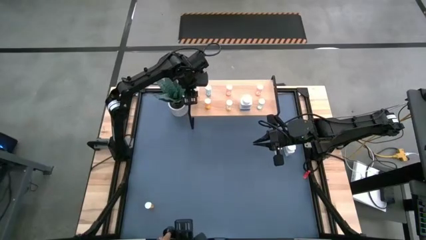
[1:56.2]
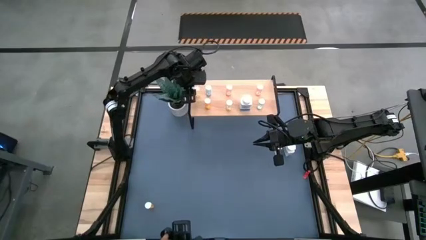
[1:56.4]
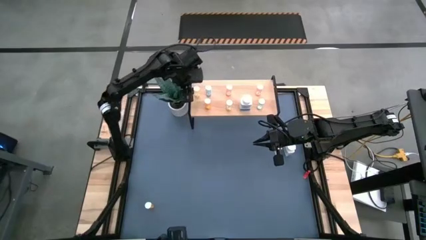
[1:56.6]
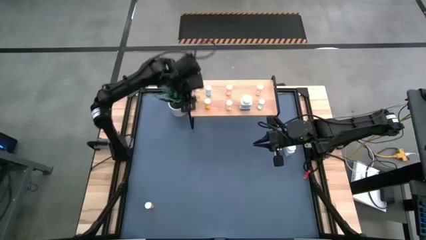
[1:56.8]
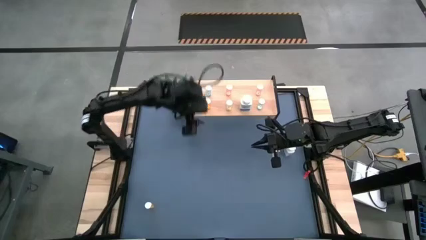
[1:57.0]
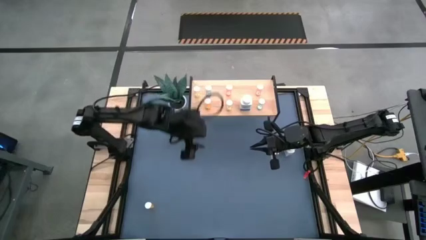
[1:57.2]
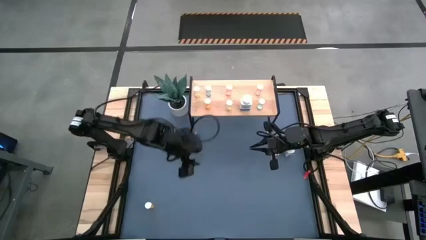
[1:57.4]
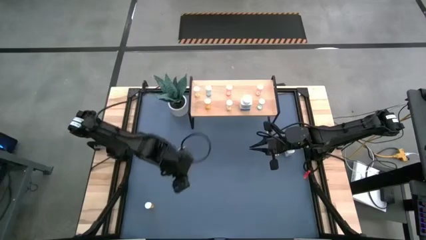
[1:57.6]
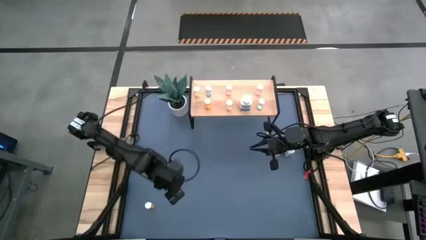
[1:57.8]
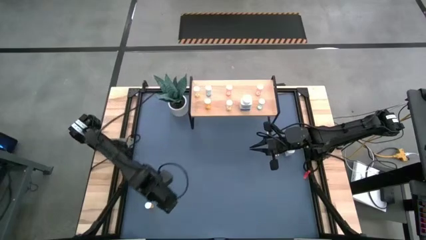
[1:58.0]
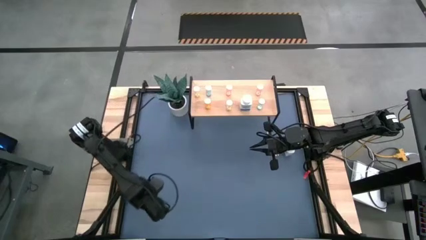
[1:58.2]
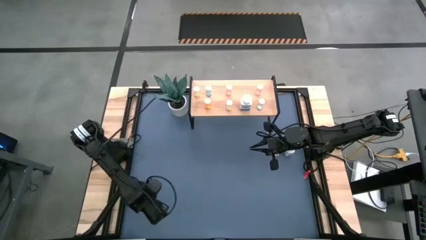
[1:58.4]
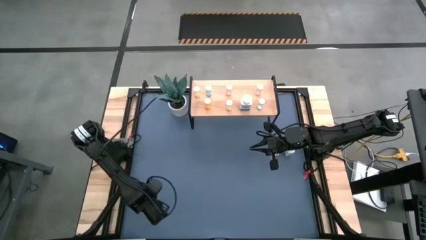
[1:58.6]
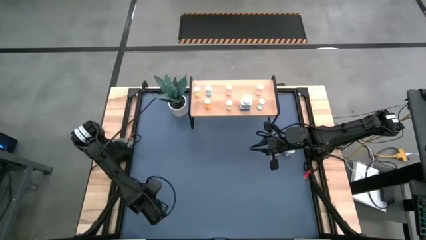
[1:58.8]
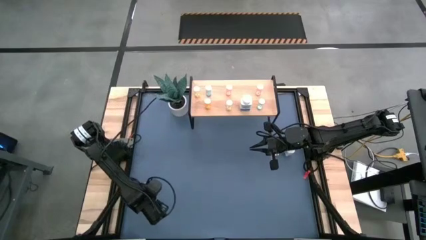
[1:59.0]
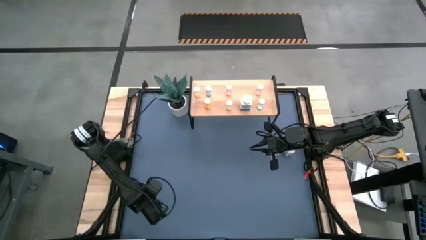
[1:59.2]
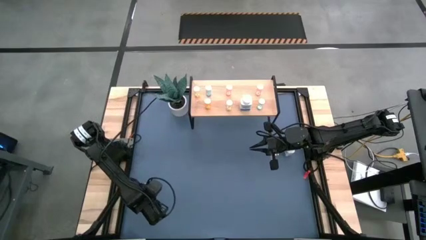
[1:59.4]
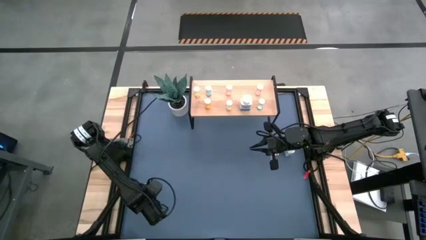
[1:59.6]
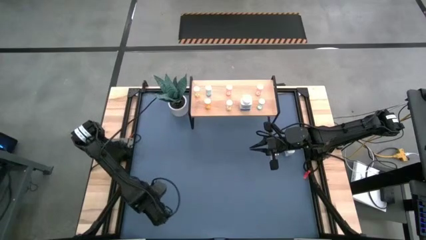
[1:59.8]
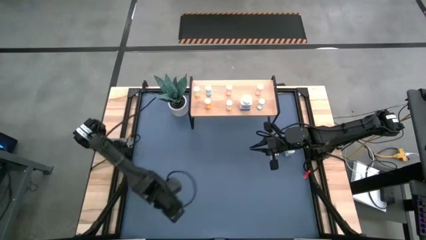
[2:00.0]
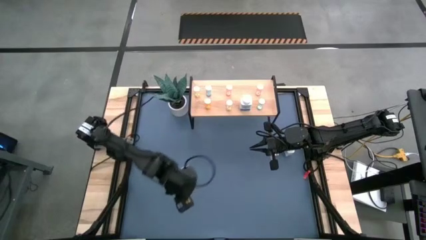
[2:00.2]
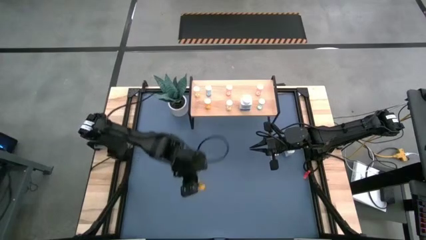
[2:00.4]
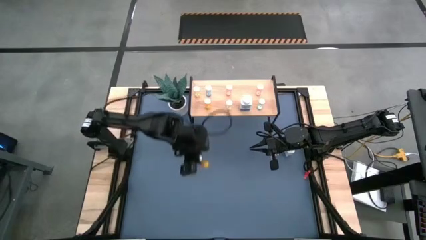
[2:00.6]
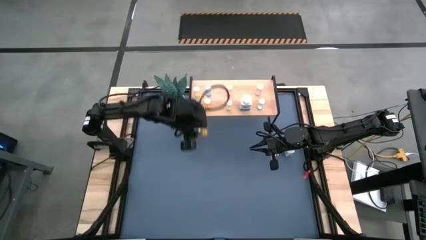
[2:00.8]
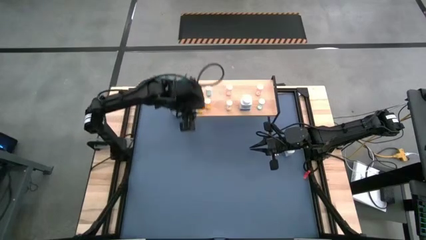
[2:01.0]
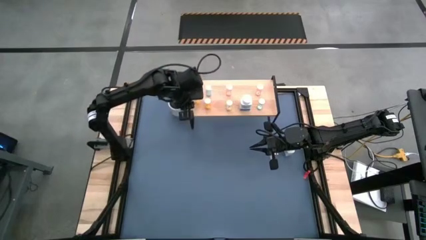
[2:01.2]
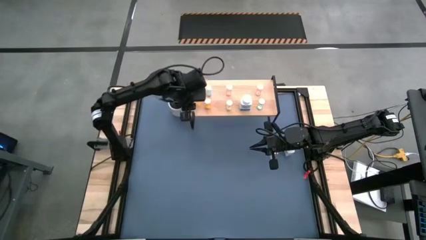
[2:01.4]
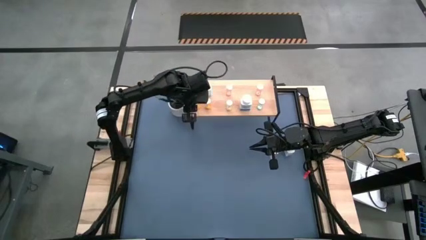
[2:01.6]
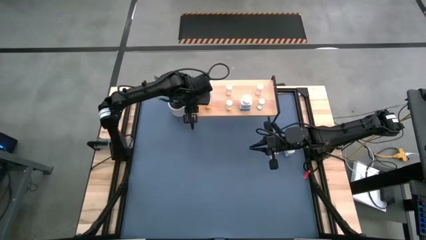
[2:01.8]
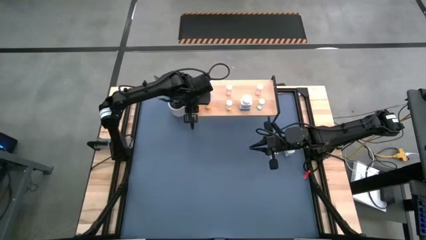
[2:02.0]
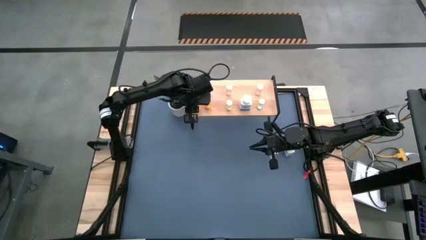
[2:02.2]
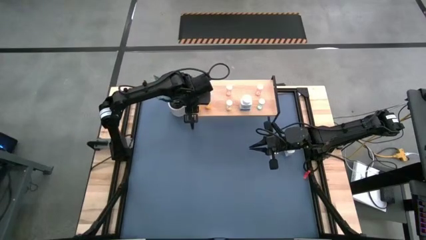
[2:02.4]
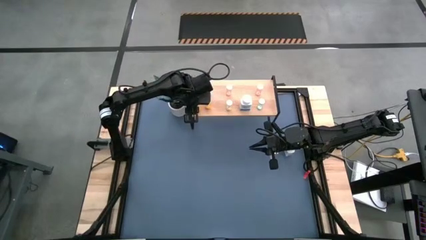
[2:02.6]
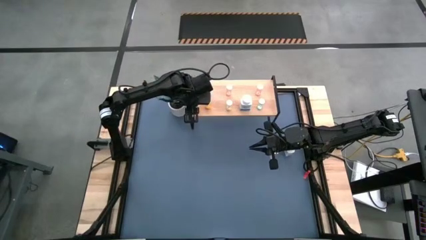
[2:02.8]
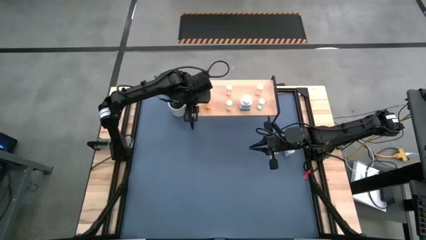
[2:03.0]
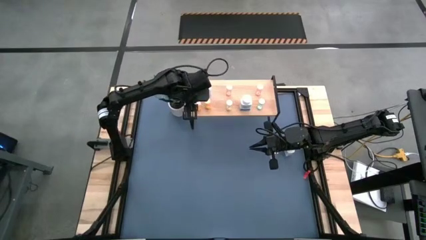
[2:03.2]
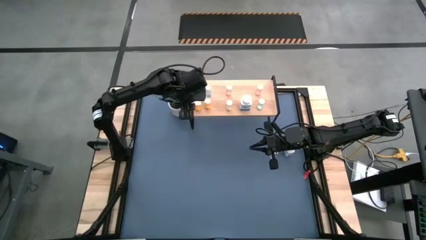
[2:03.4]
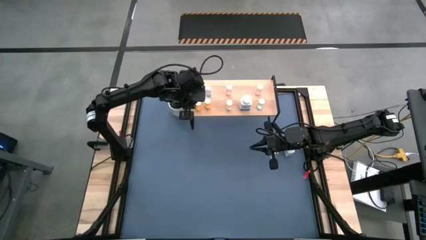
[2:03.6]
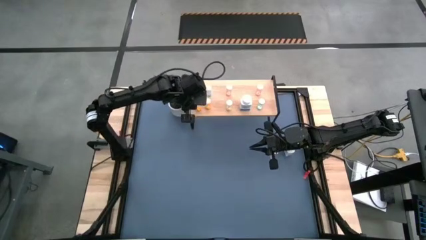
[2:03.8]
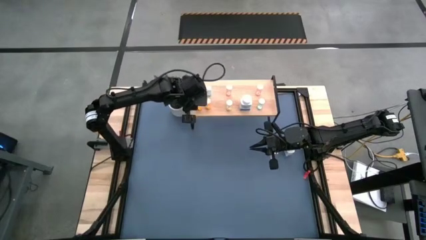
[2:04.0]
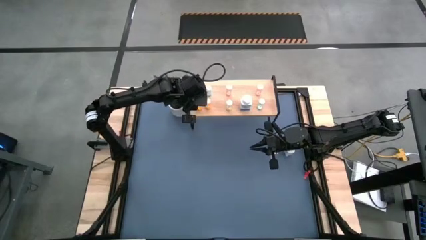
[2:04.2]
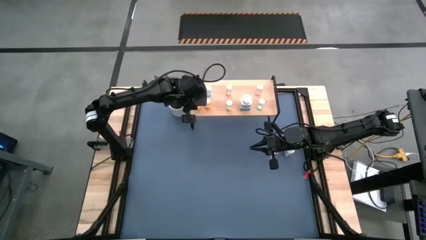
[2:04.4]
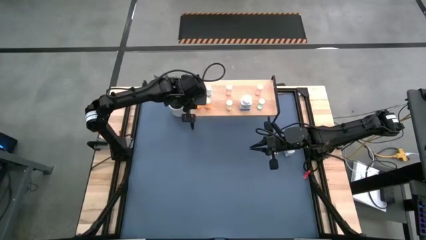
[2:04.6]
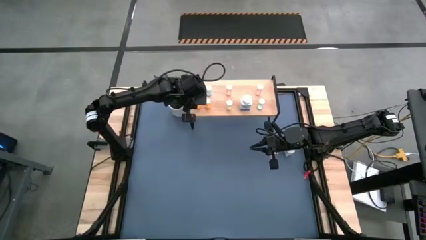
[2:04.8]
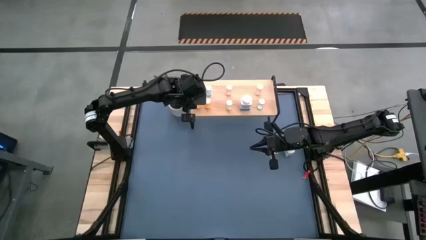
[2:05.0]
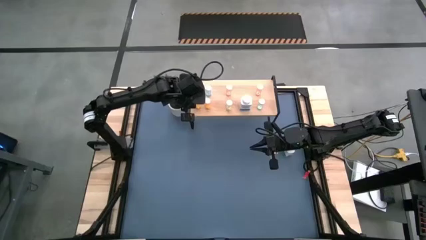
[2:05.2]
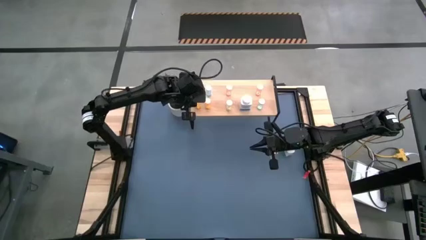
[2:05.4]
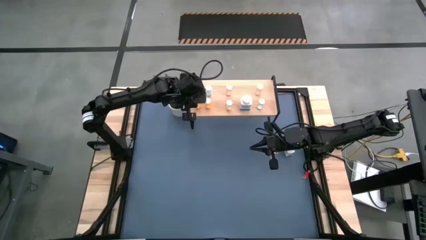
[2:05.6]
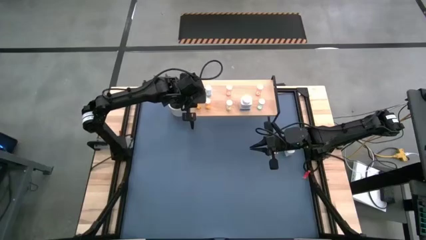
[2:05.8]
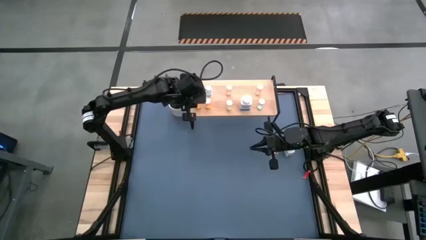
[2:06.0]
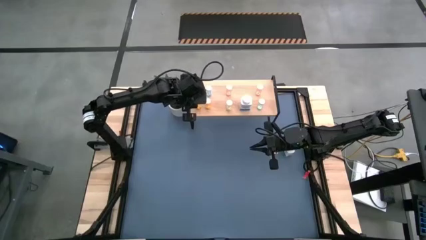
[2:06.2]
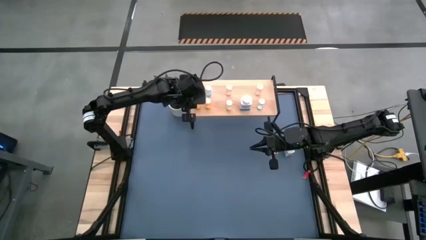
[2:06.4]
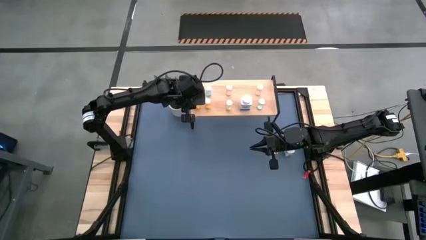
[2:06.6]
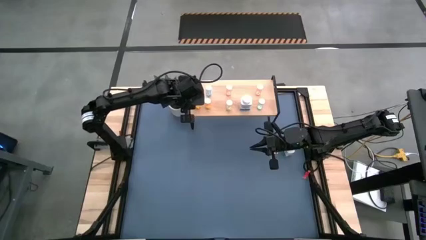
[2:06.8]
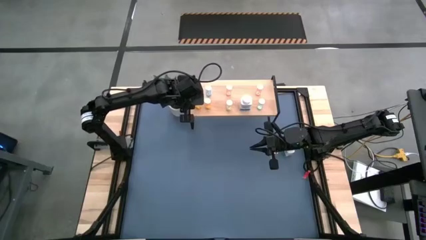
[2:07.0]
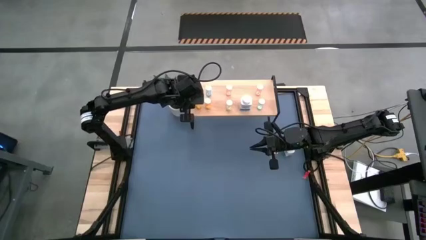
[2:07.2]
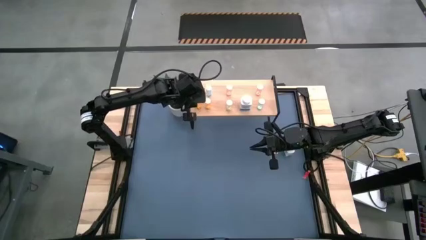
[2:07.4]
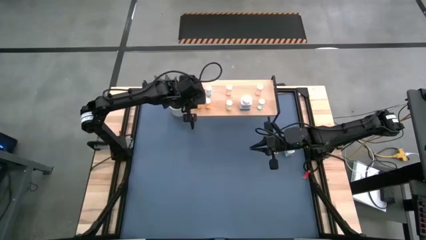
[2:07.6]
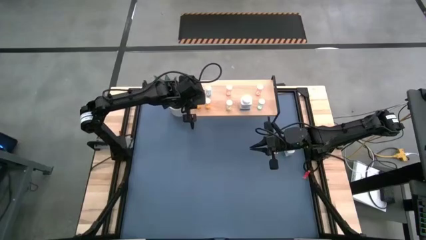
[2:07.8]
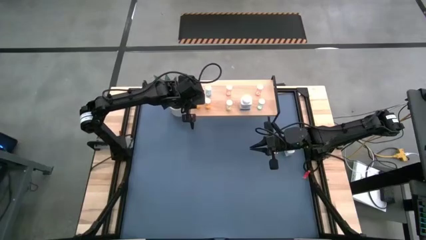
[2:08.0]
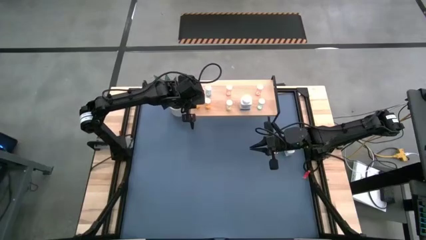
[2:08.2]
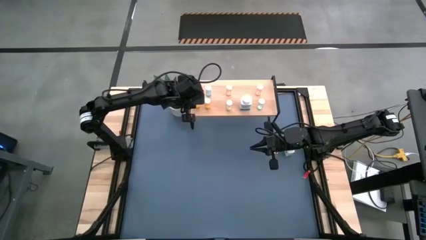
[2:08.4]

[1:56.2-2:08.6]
Task: Pick and place medicine bottles onto shelf by color
Put the orange medicine bottle on the shelf

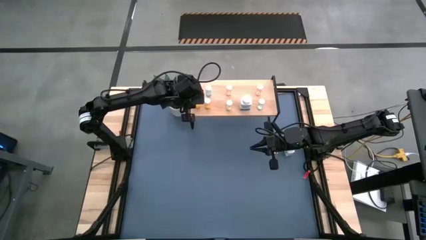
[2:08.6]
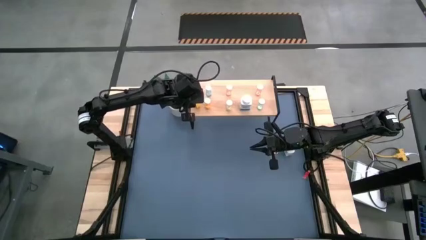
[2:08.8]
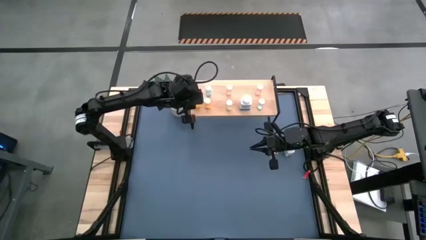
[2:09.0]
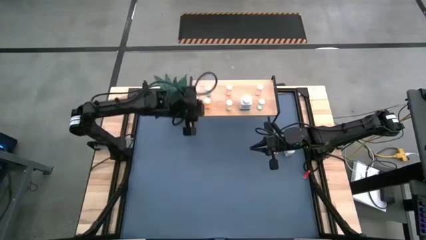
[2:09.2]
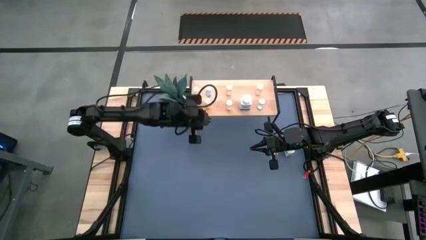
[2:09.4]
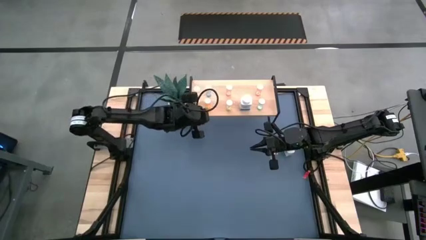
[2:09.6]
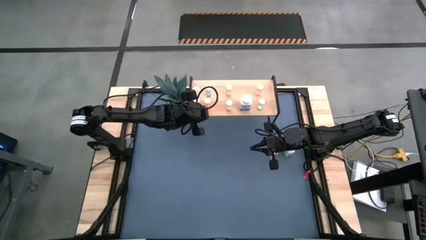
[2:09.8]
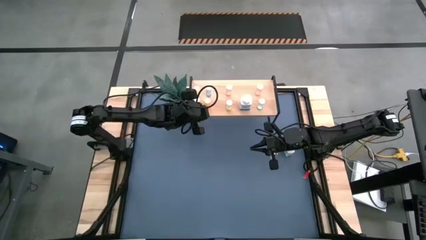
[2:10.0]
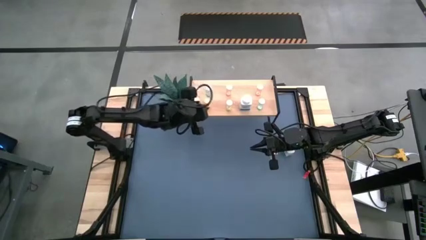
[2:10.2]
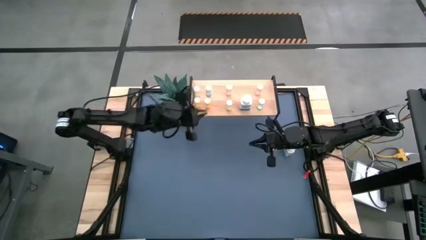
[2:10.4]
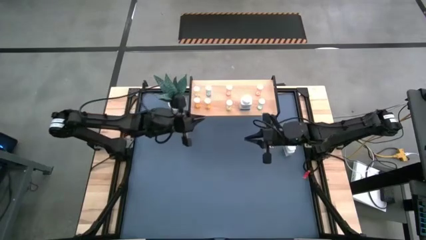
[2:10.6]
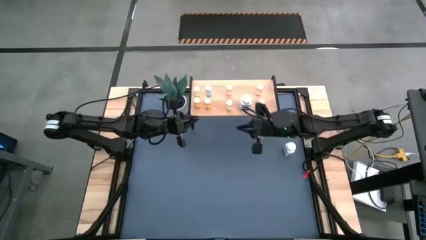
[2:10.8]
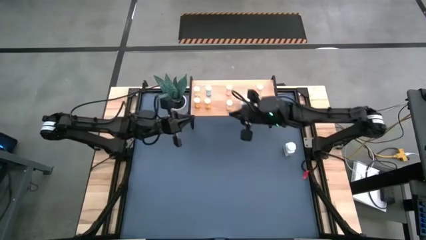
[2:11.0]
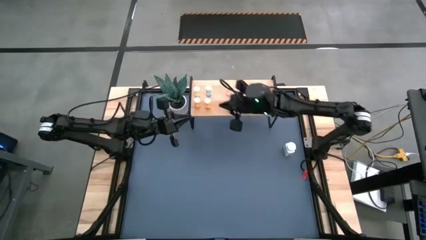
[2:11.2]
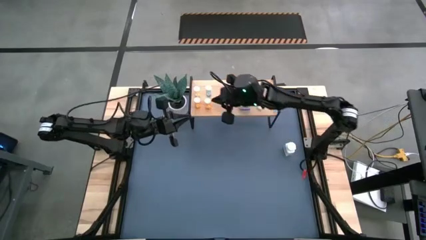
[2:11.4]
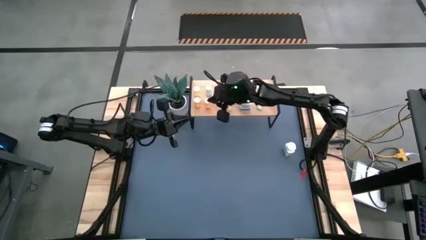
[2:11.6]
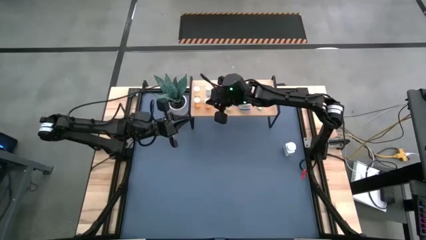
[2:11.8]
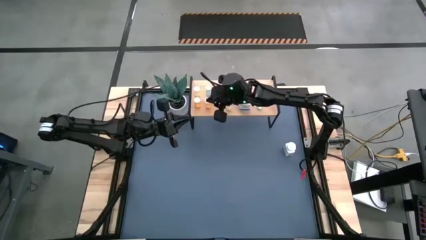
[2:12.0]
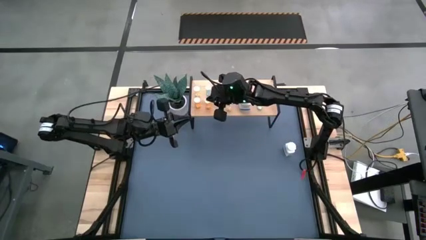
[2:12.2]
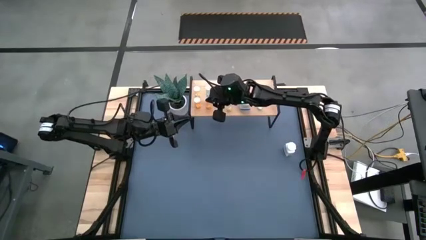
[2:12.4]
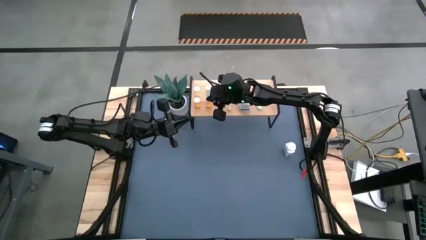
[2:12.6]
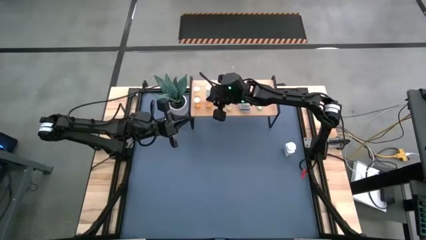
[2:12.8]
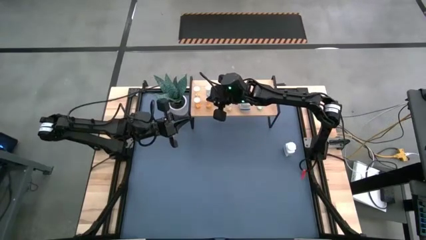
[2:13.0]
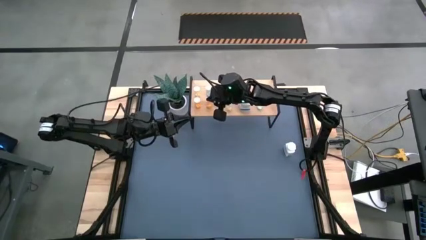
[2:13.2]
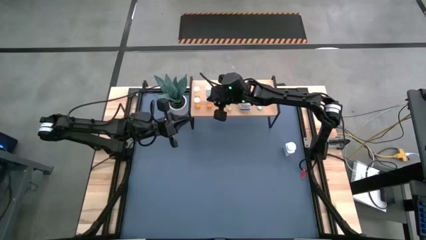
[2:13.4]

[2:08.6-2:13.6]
Adjust the orange medicine bottle on the shelf
